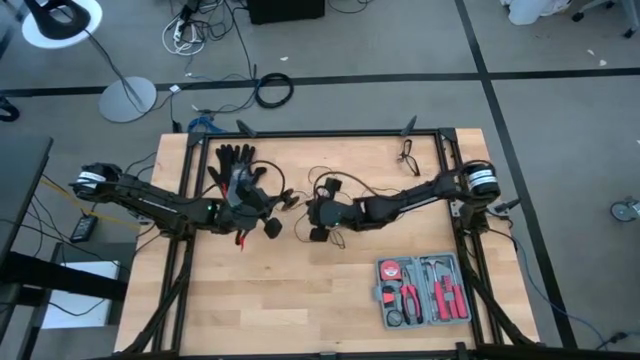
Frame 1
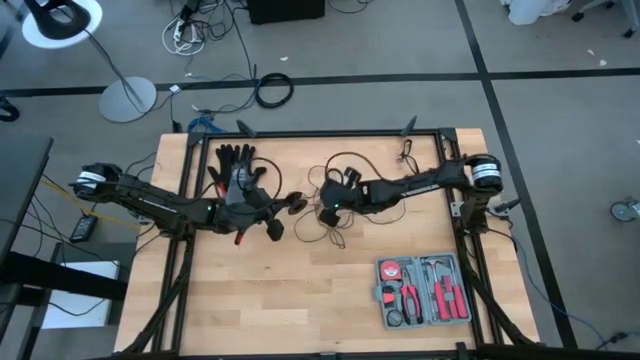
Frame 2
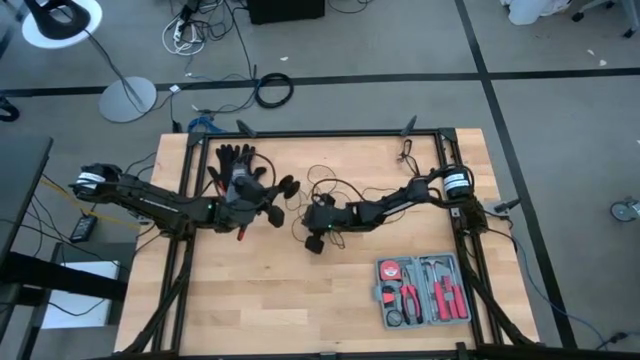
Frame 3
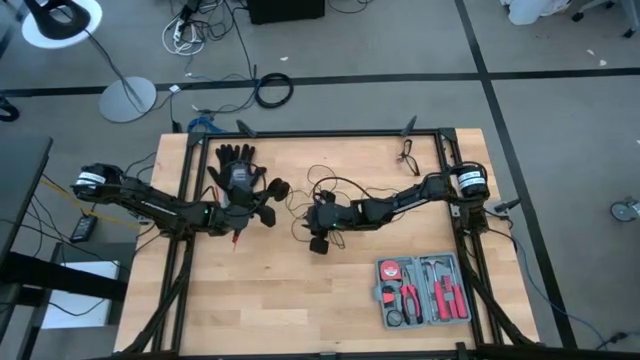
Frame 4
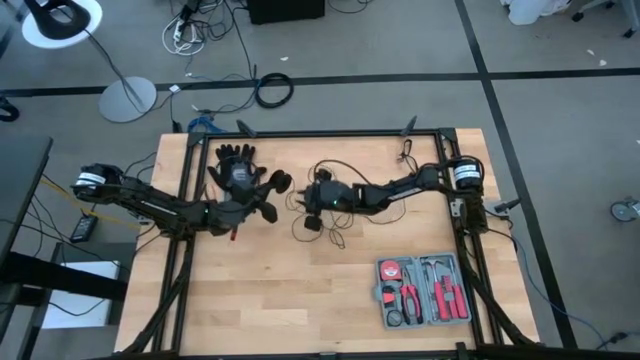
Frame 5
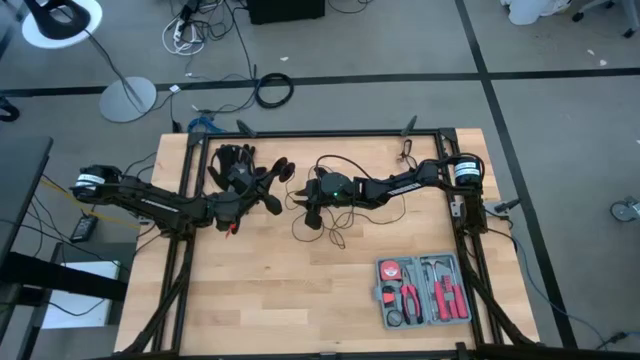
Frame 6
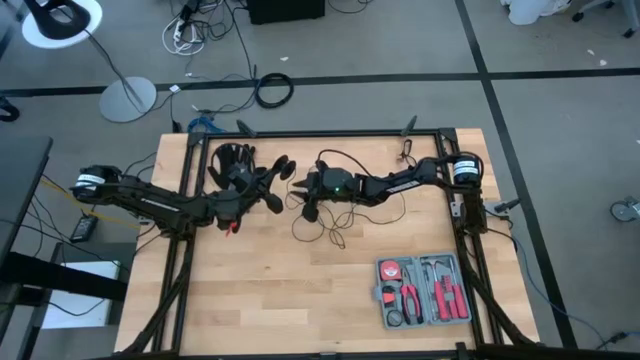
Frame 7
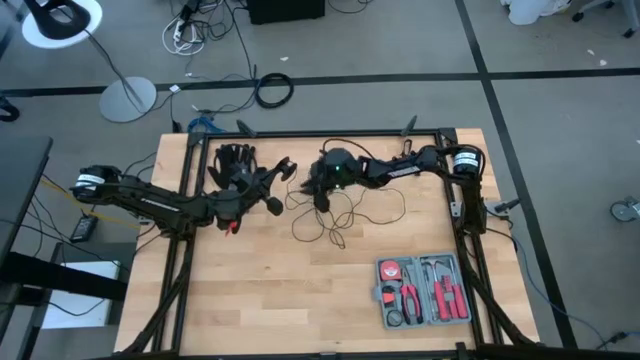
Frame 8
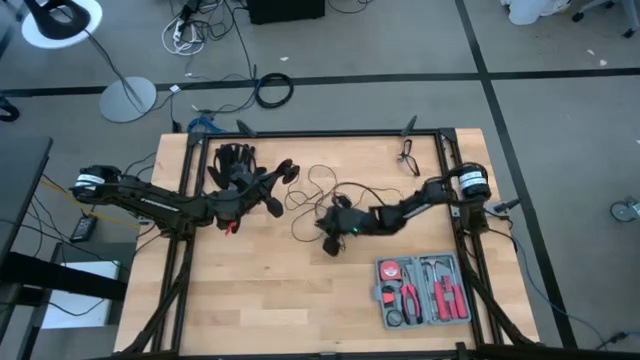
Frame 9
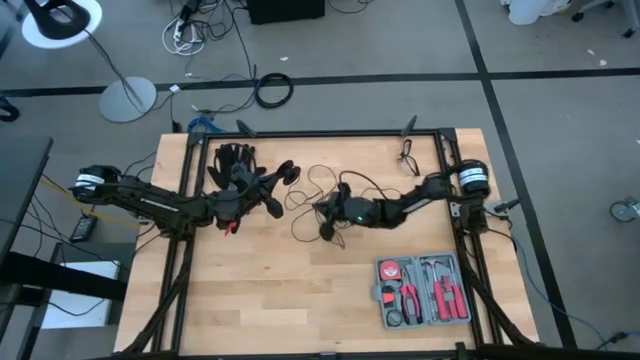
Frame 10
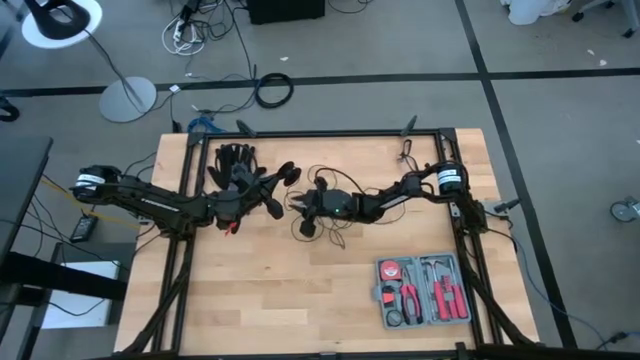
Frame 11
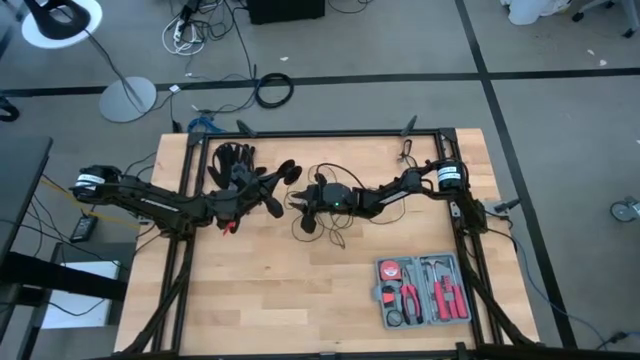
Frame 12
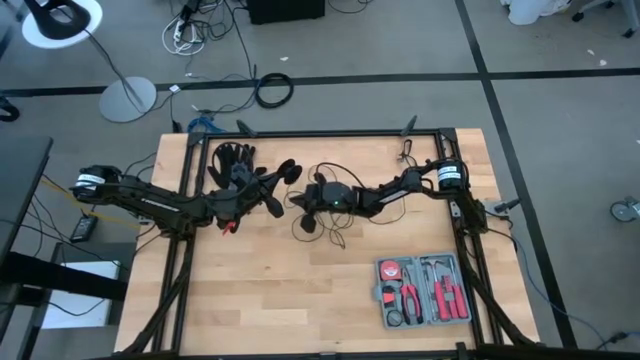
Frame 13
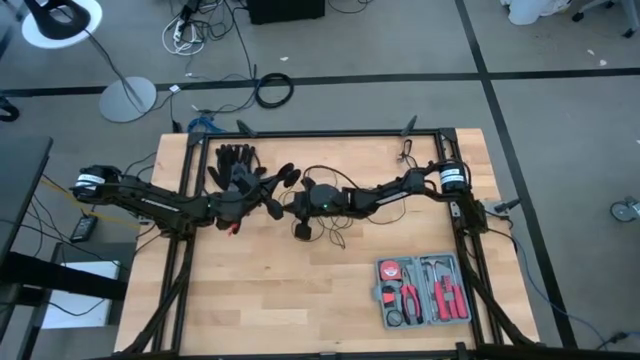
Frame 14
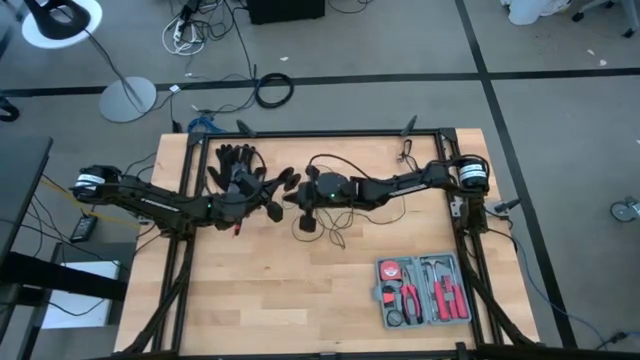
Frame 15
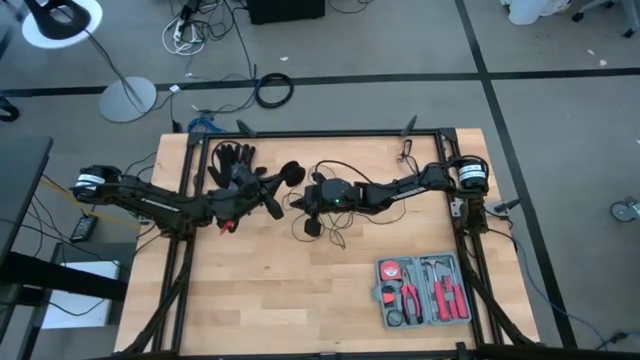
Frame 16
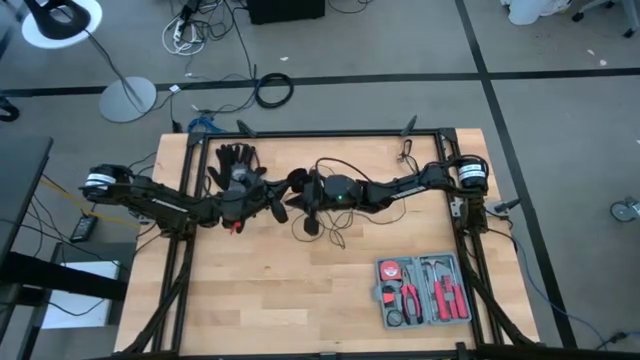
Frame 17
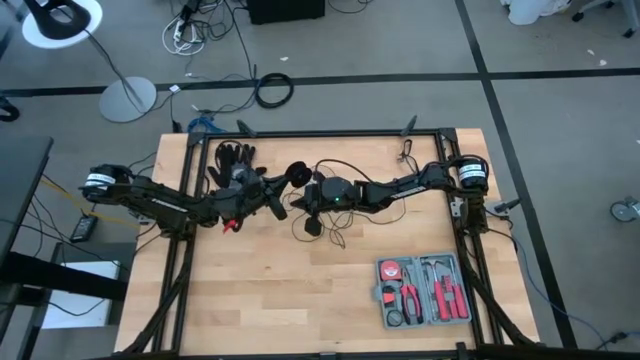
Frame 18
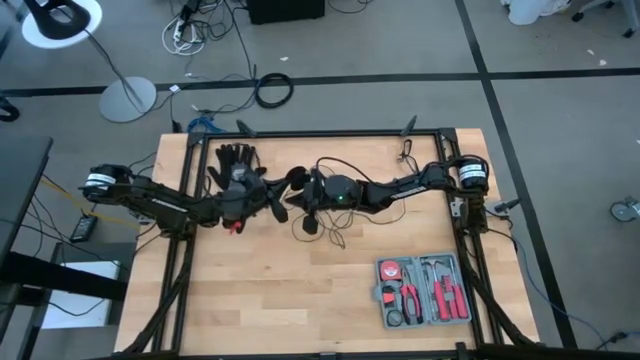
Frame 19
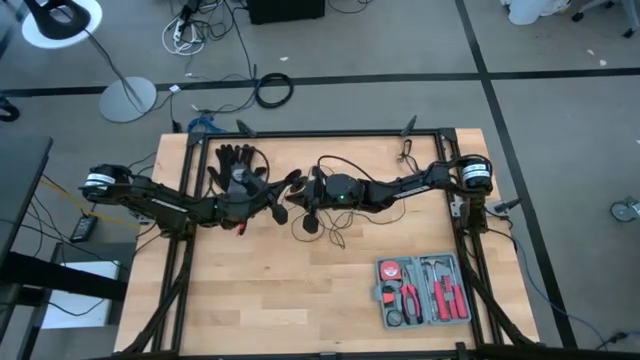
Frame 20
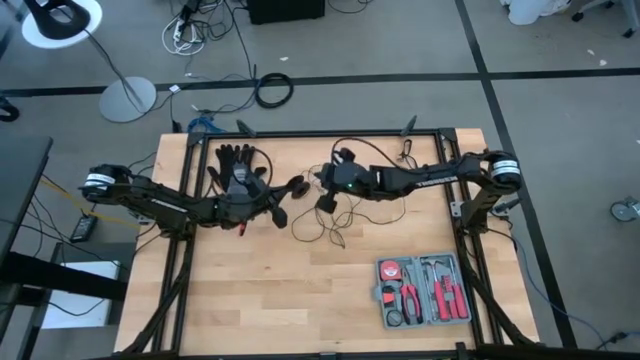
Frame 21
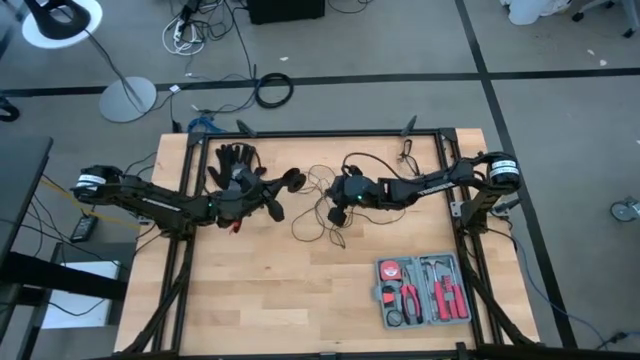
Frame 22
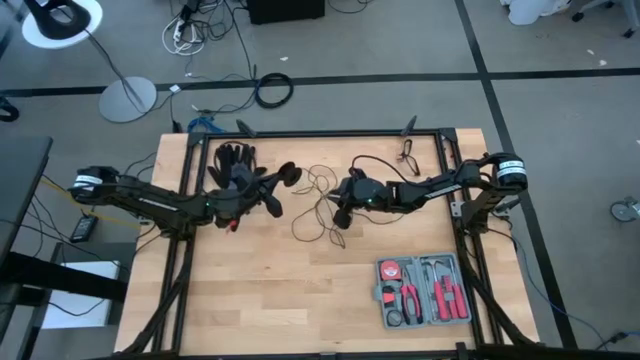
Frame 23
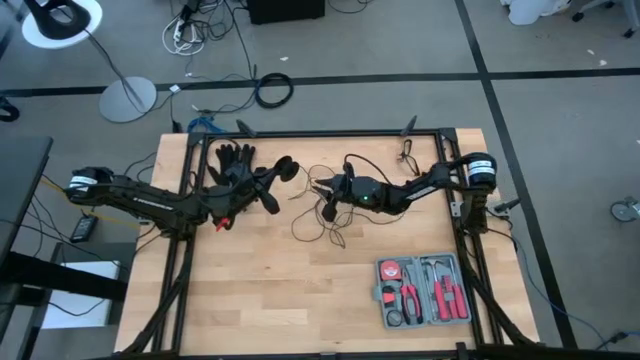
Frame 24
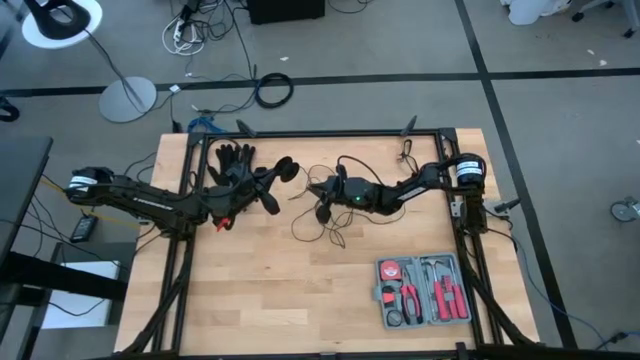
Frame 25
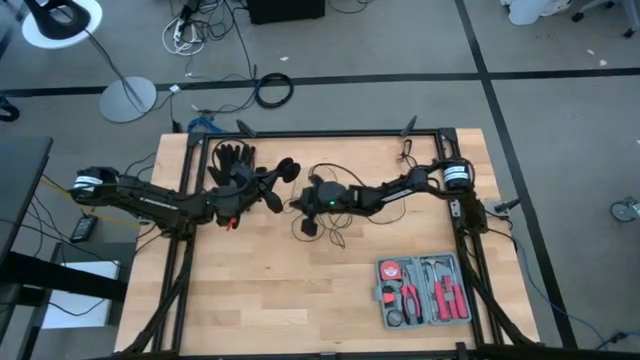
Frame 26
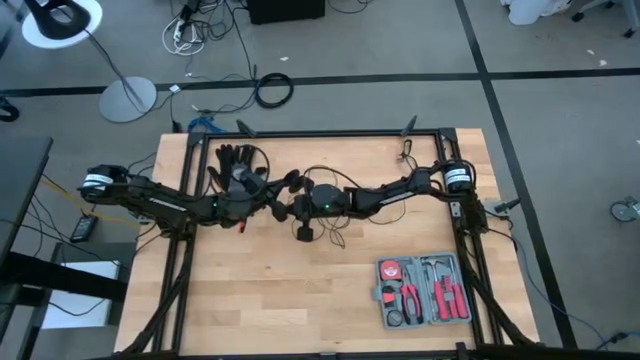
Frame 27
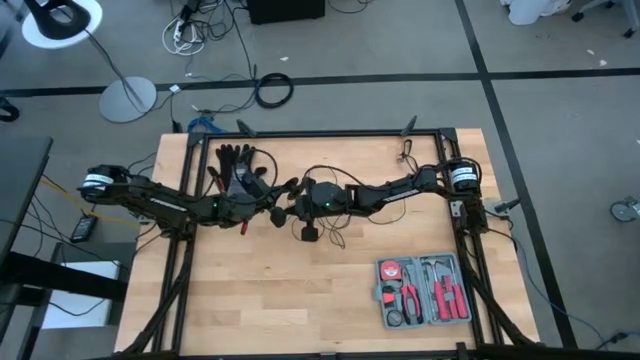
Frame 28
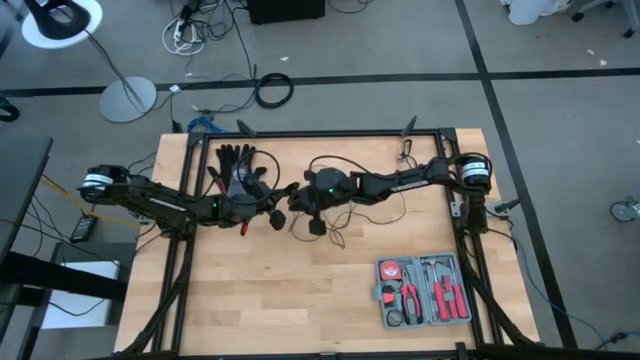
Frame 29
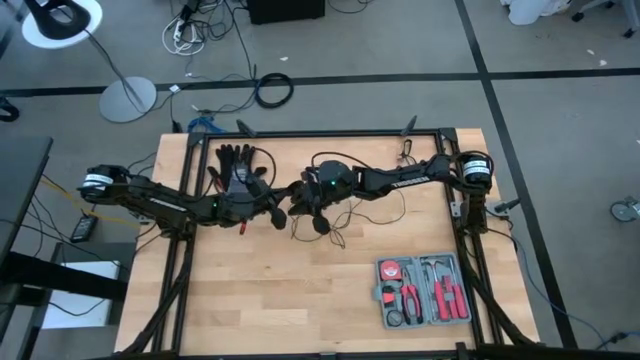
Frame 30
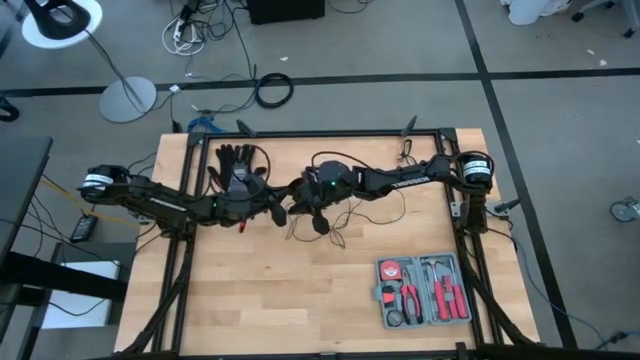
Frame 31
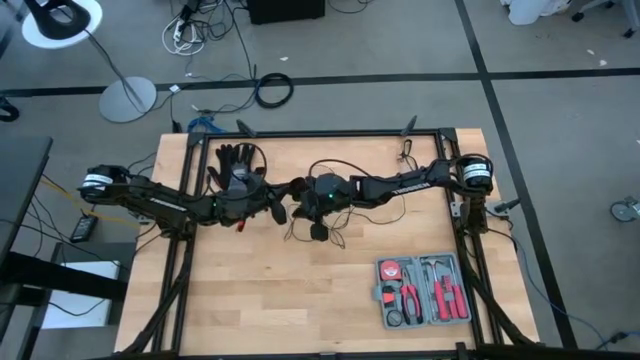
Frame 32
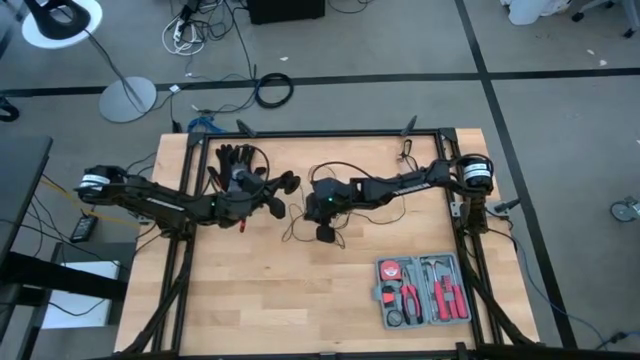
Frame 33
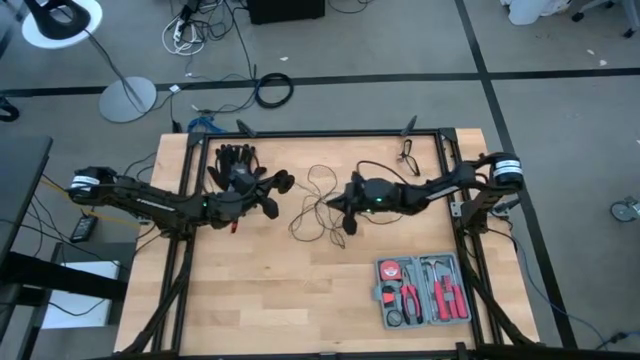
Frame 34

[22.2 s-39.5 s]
Task: Coil cords
Coil the black wire

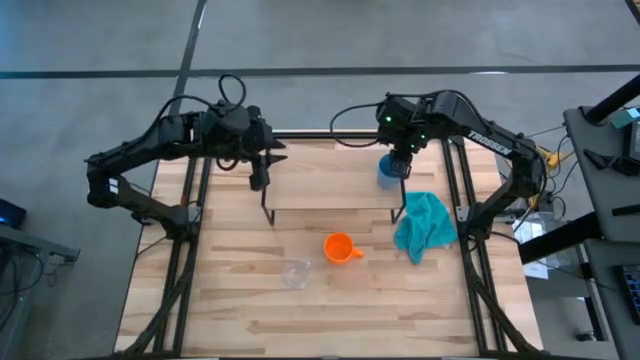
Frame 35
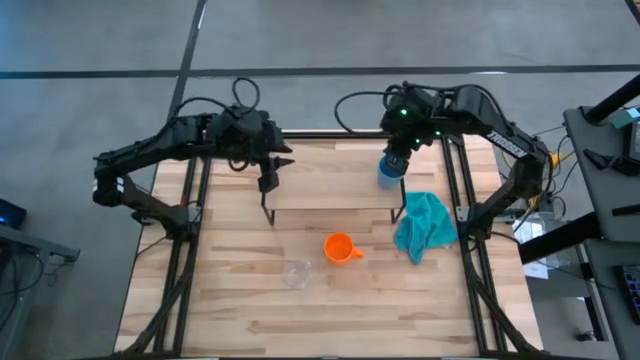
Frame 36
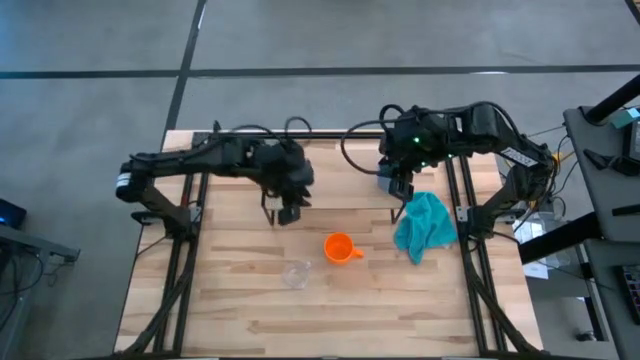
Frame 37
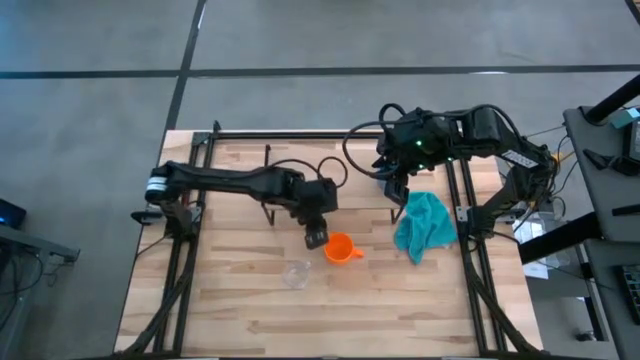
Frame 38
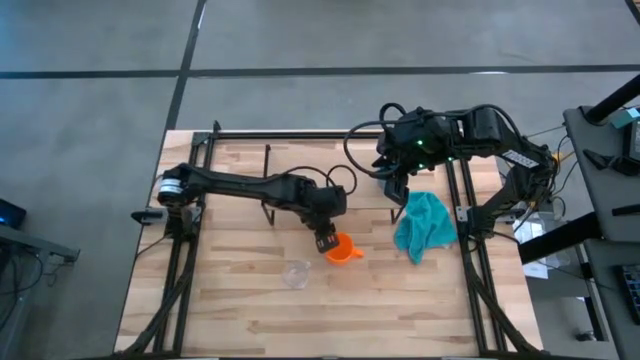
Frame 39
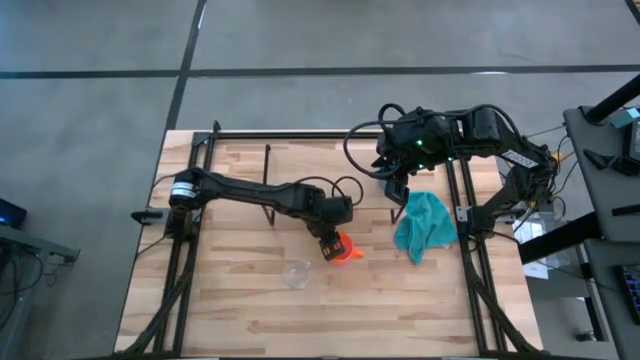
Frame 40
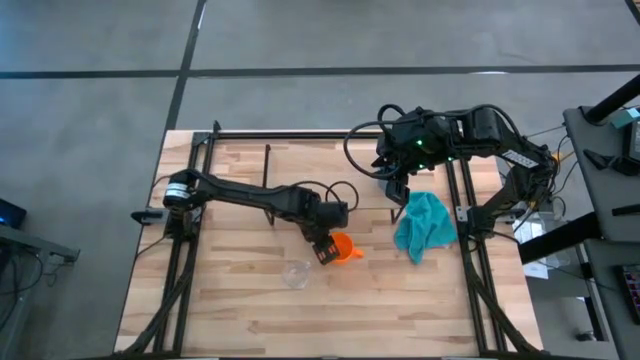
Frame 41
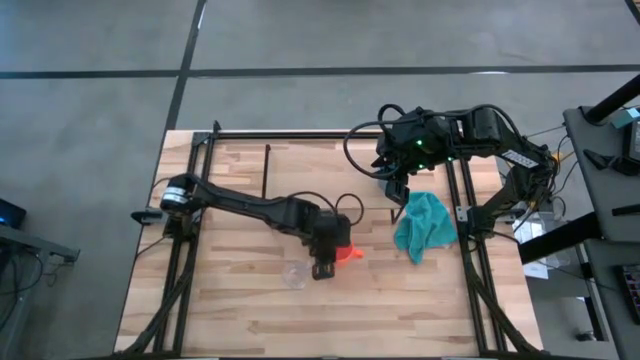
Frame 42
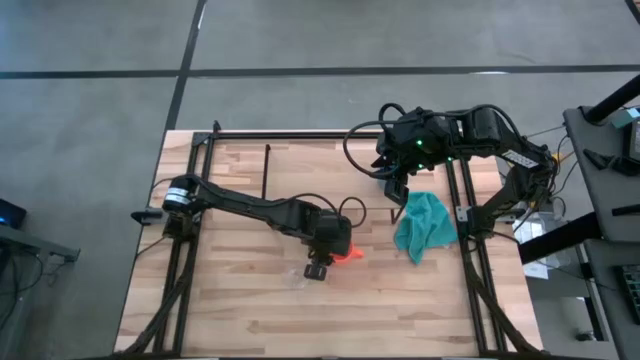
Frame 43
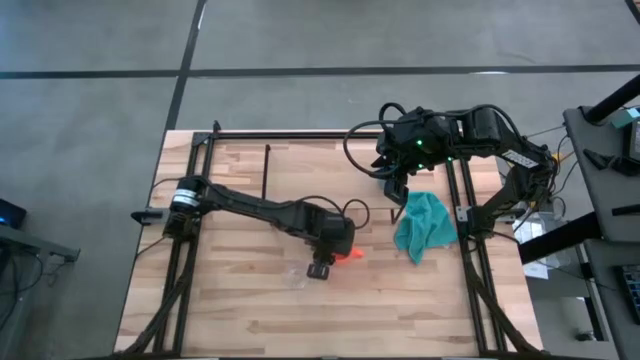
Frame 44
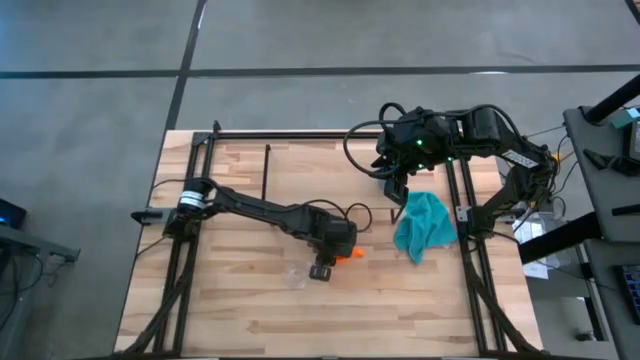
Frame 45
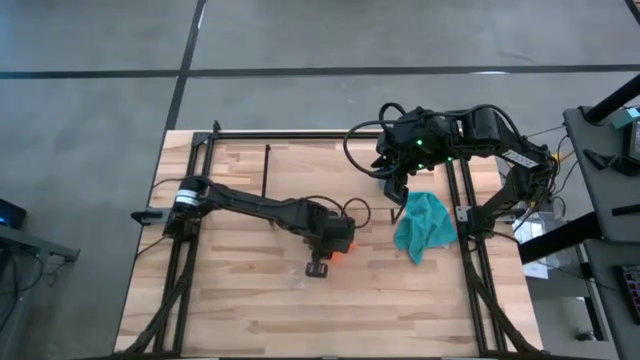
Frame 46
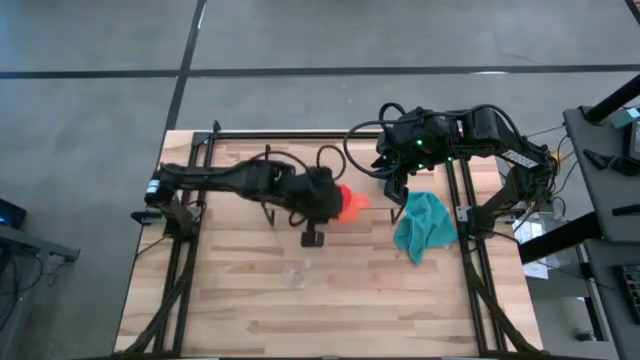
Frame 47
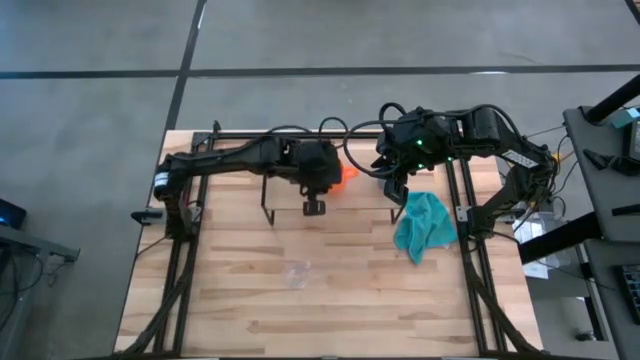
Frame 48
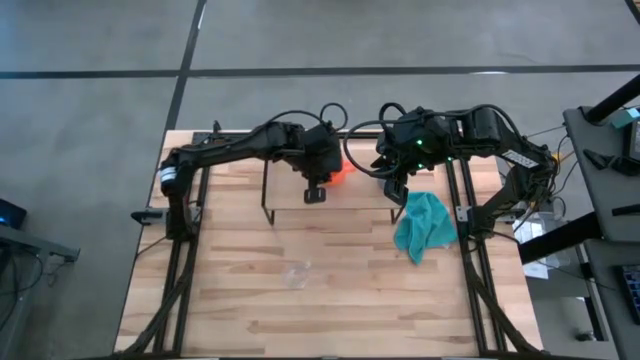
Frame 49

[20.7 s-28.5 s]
Task: Stack small to large cups/mugs on shelf
Put the orange mug onto the shelf
